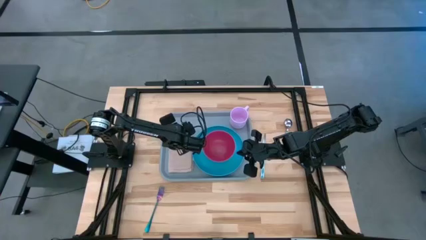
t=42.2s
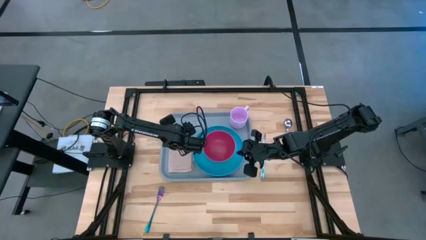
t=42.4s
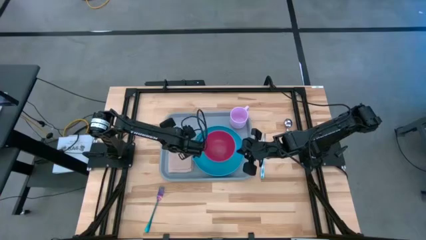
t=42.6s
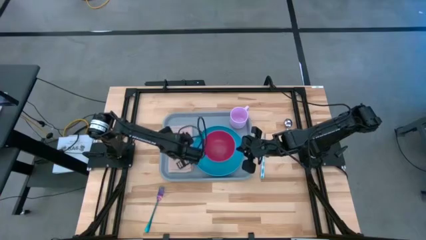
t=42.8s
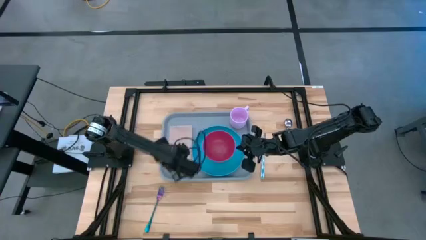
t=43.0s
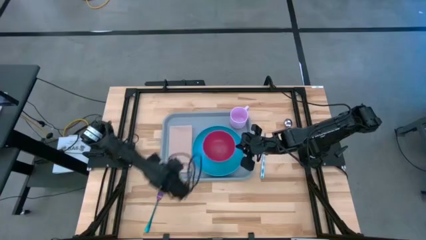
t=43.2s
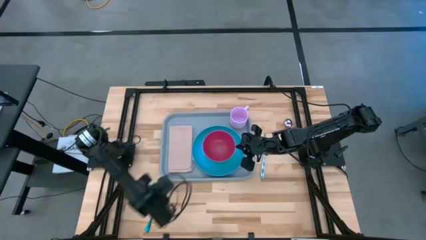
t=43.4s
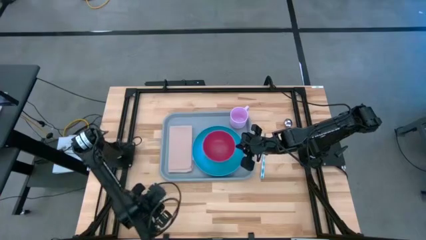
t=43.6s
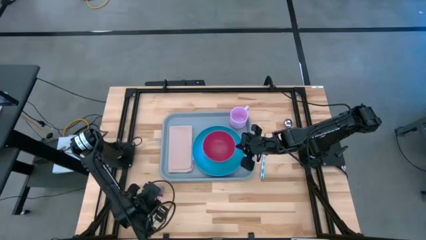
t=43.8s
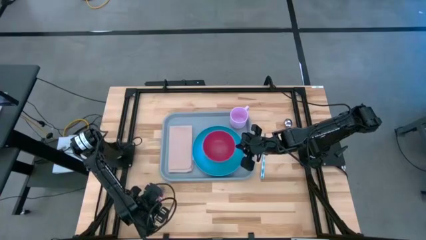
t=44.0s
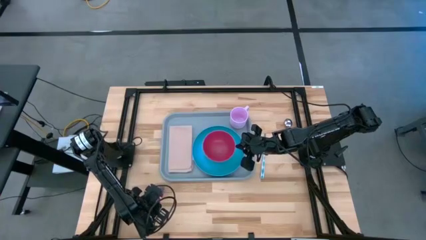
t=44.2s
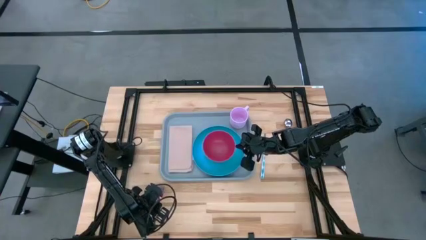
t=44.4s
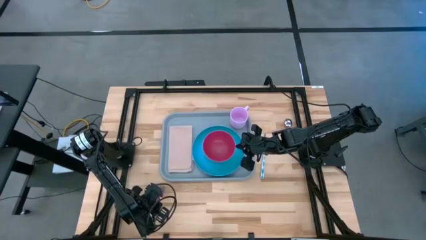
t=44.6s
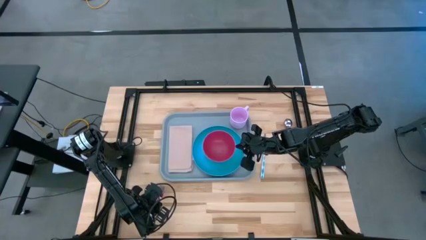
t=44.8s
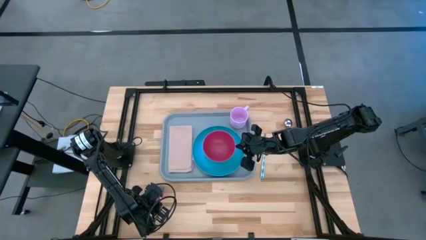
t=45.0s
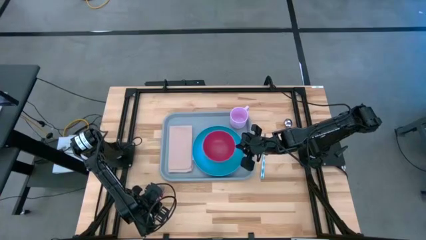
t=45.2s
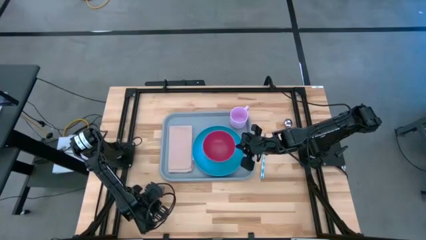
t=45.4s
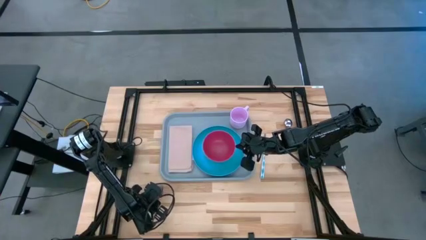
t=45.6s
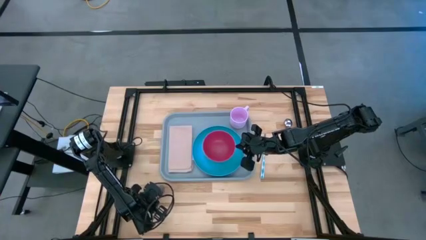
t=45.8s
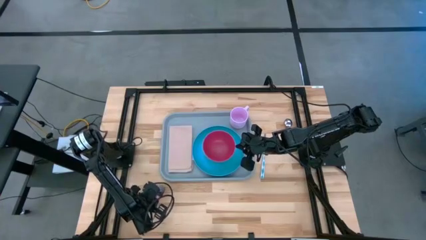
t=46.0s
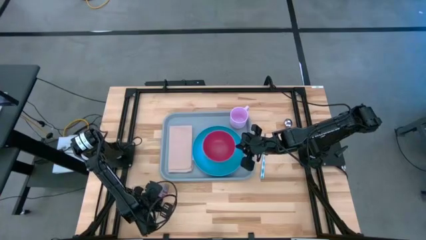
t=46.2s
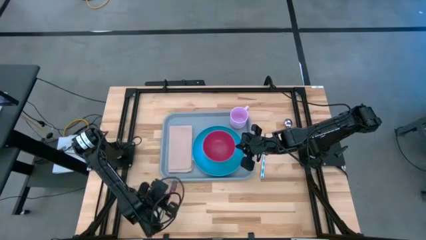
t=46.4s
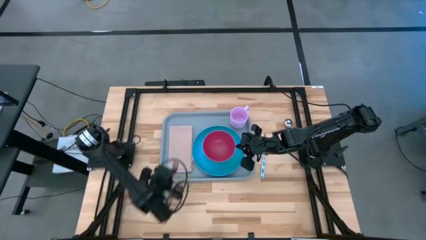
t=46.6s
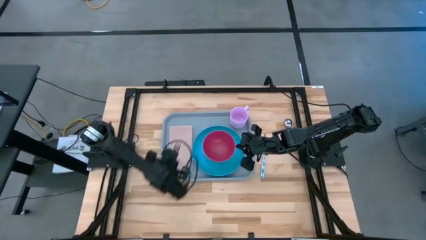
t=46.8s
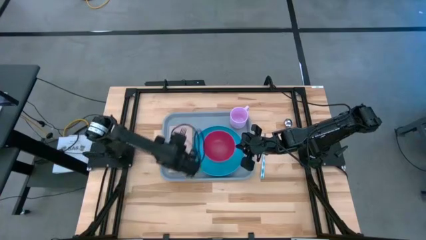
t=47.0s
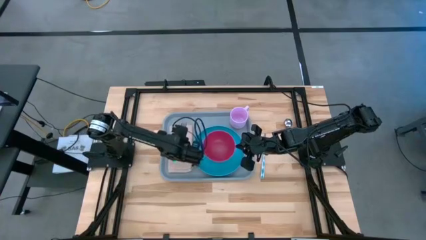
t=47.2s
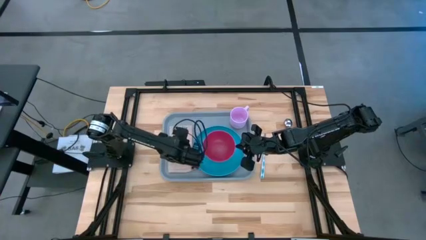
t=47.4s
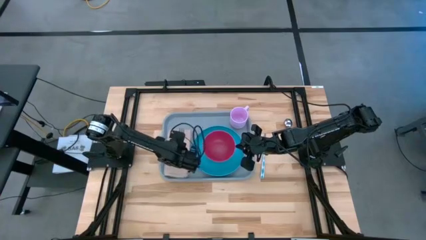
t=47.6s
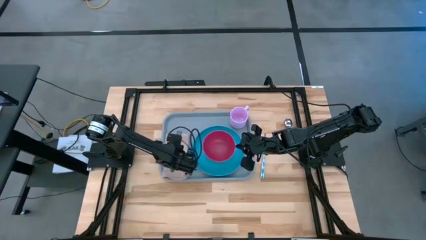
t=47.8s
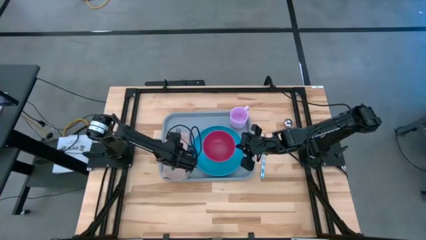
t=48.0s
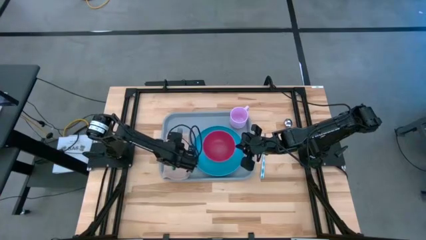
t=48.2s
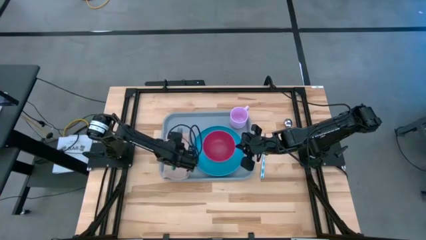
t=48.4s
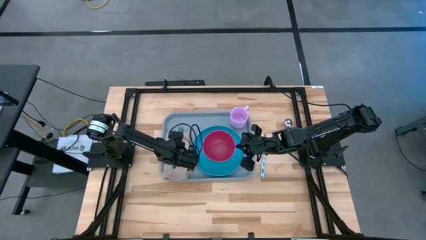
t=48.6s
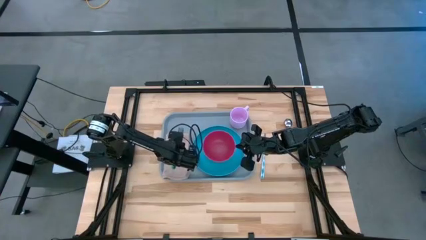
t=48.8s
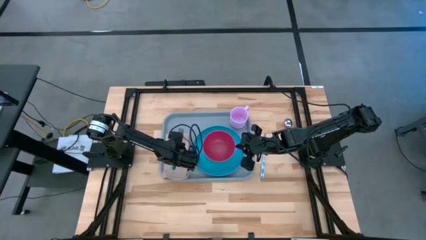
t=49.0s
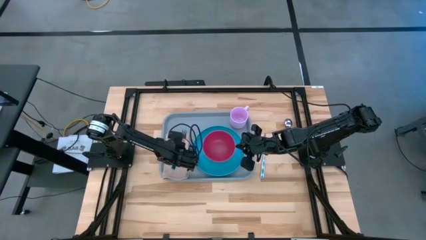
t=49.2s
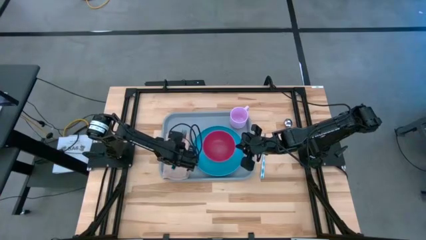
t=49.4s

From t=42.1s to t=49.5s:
Task: Set up tray
Put the fork on the brown napkin

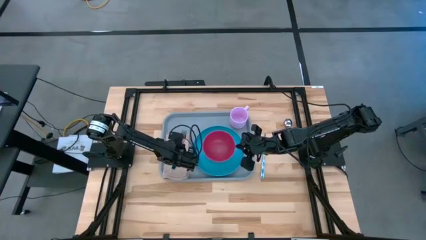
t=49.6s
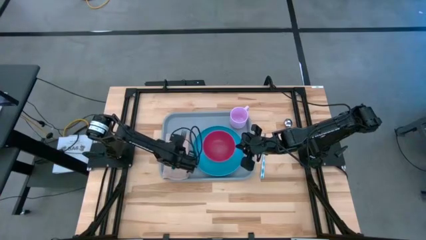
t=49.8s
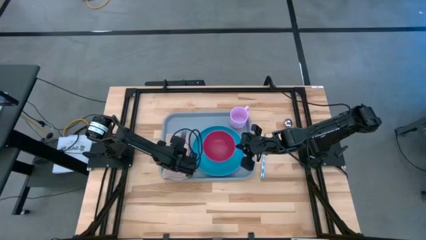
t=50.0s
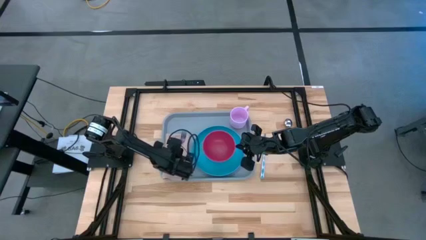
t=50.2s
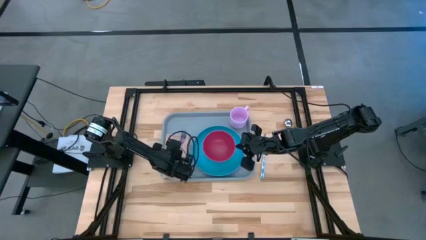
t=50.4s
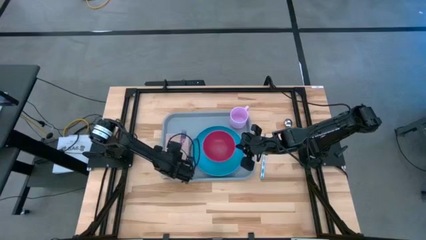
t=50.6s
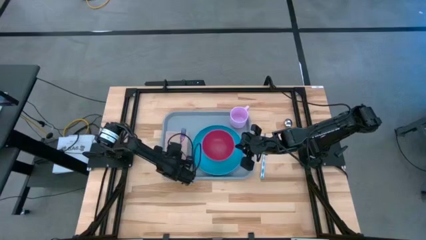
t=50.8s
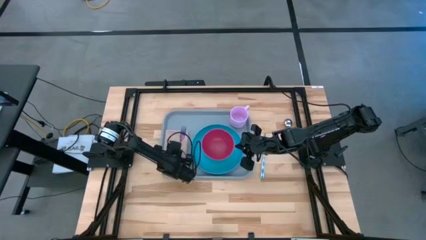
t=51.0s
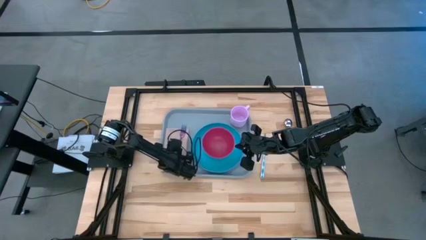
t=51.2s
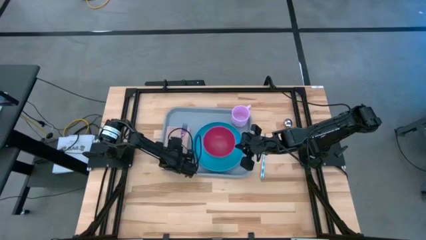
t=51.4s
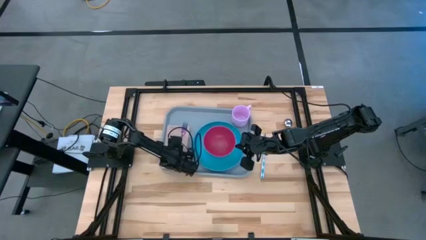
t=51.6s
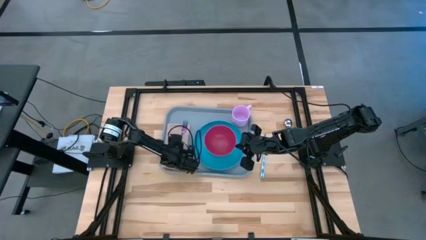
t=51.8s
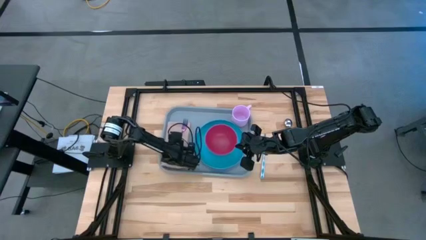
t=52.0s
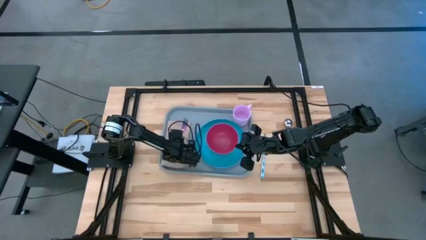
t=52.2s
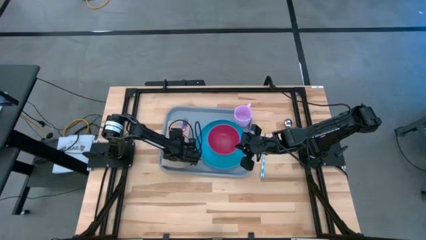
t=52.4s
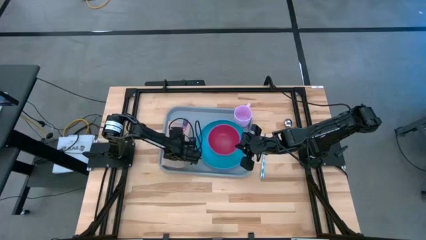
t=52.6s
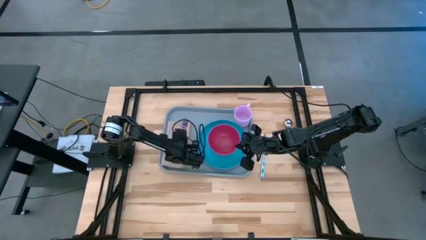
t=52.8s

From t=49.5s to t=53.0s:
Adjust the brown napkin

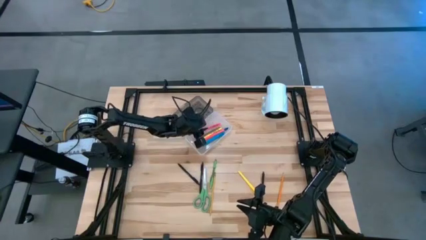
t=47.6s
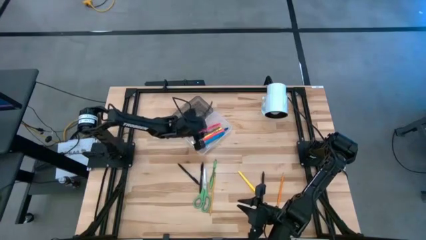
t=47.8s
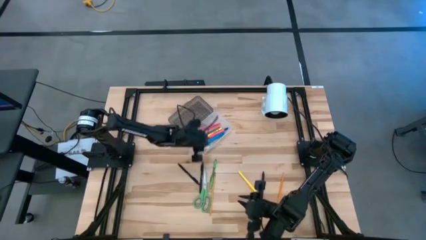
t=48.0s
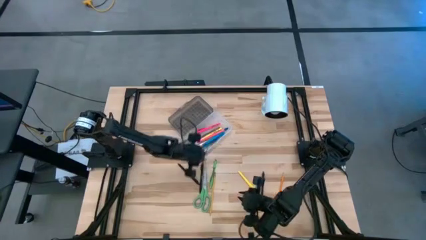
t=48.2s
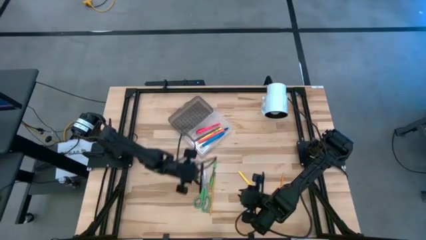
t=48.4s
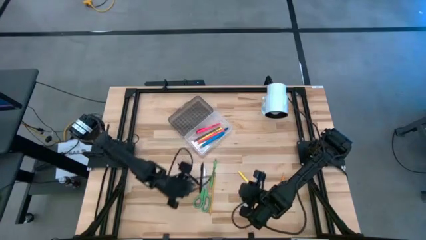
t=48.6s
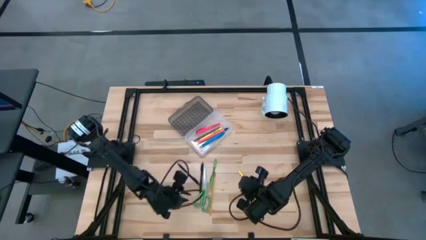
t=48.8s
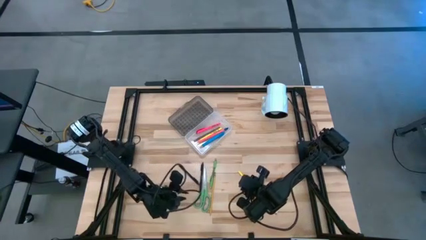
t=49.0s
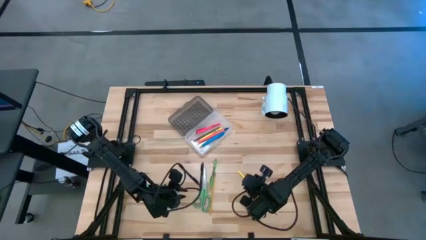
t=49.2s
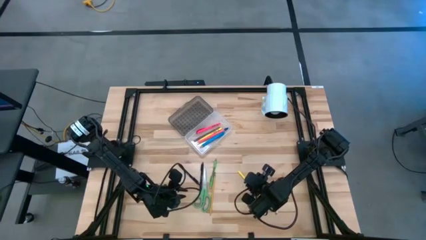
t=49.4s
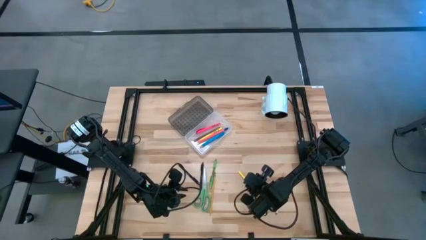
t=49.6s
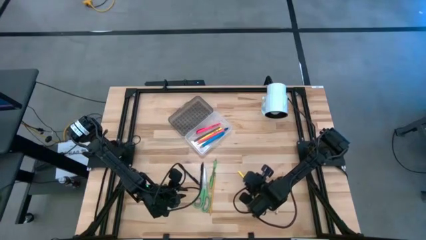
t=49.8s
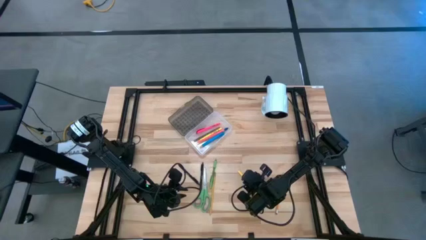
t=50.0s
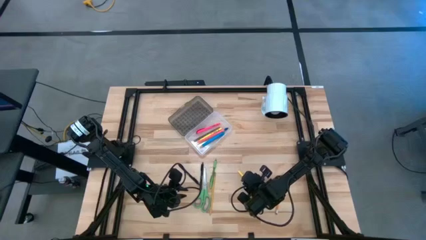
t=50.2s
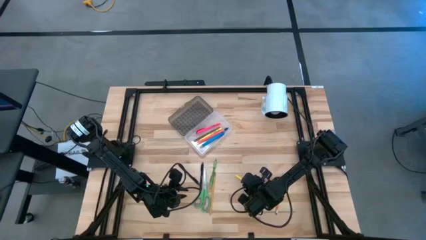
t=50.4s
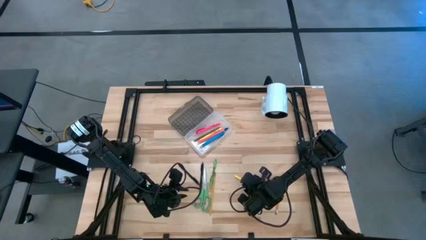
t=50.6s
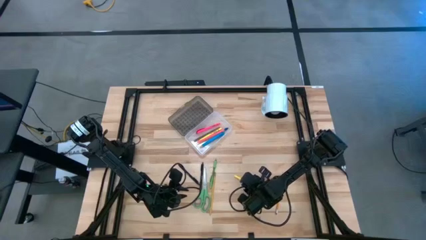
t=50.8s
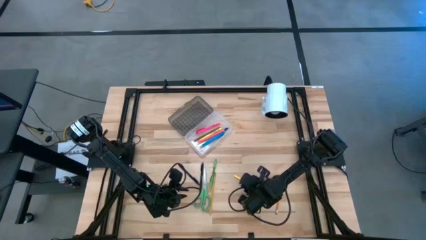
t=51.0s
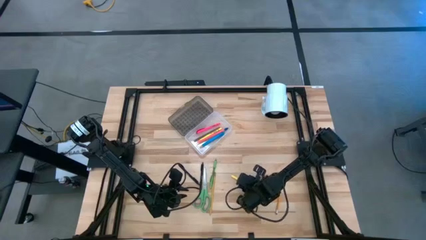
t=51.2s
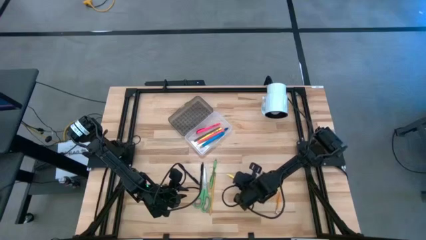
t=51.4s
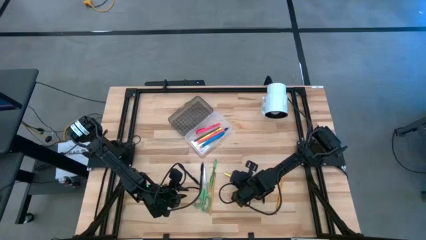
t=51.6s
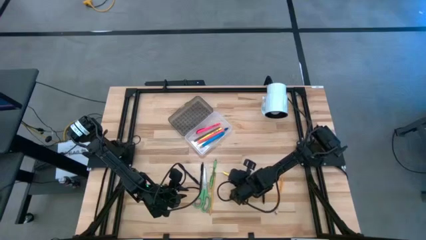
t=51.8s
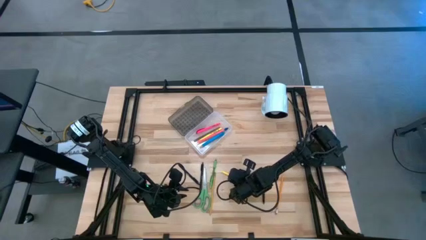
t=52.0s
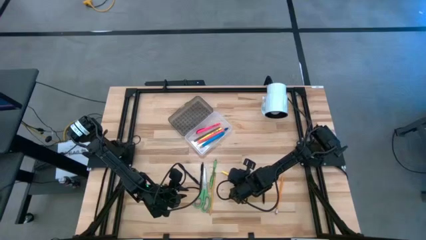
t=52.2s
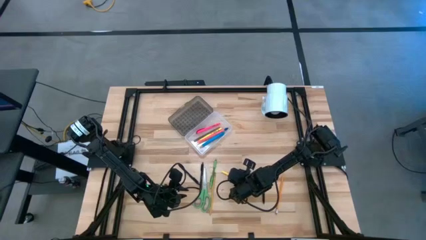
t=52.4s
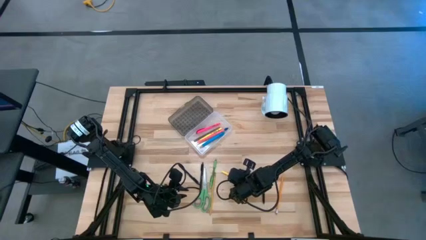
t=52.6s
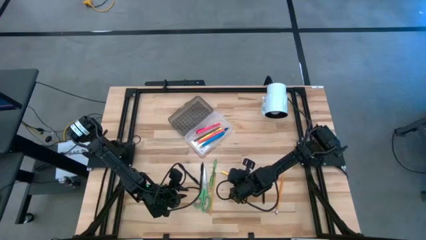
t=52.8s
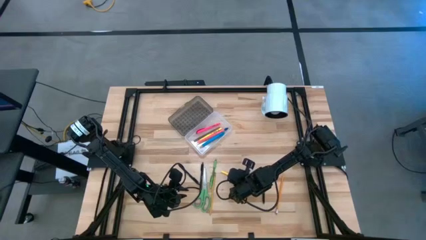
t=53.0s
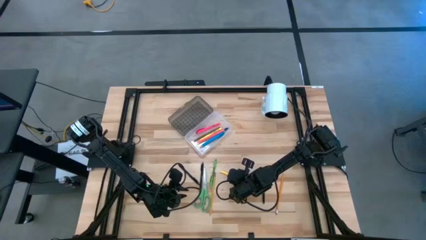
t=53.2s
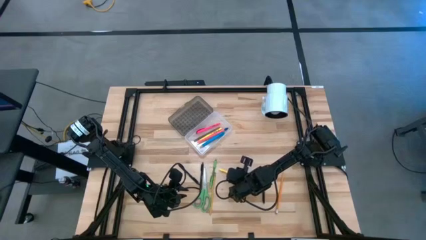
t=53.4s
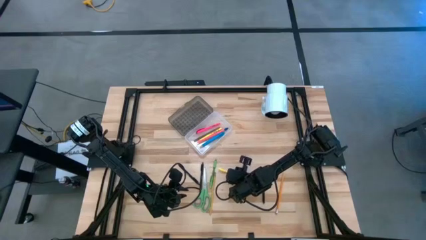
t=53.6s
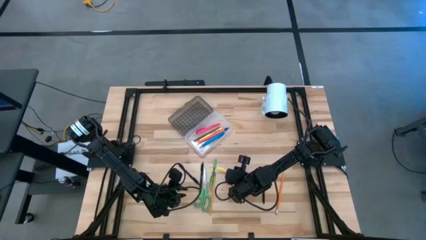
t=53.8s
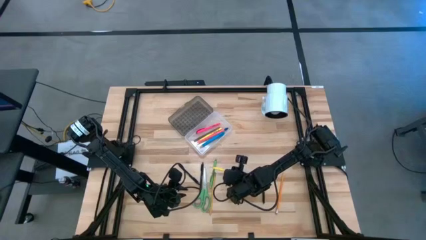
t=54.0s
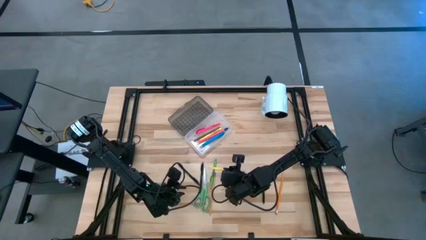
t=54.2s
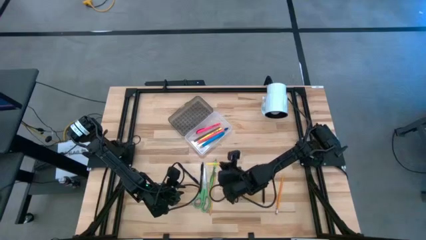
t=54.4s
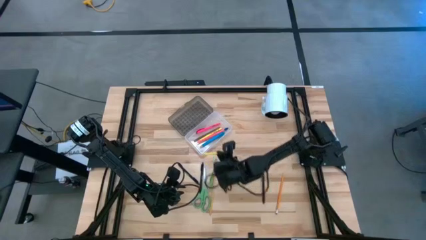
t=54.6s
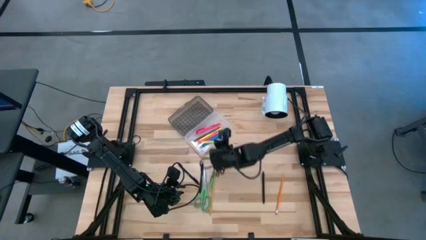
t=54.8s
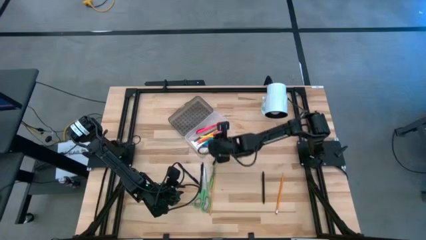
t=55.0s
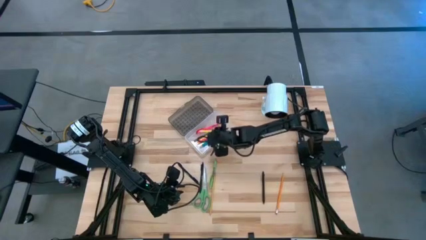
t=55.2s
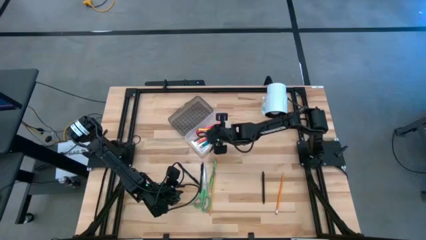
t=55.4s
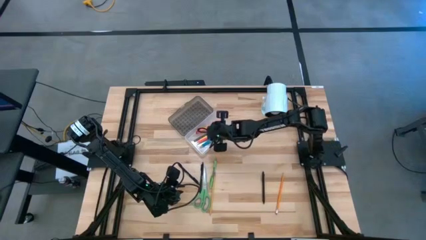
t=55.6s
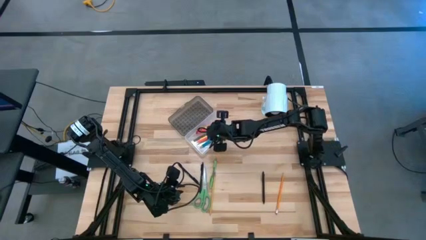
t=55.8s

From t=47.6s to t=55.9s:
Task: Pick & place school supplies into a supply box
Put the yellow pen into the transparent supply box
